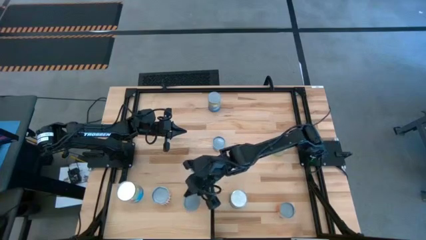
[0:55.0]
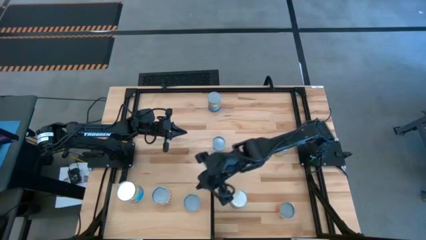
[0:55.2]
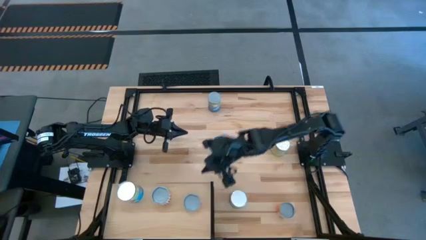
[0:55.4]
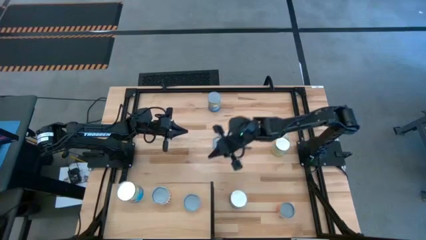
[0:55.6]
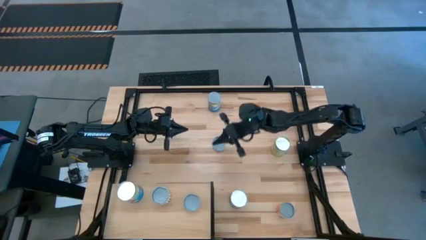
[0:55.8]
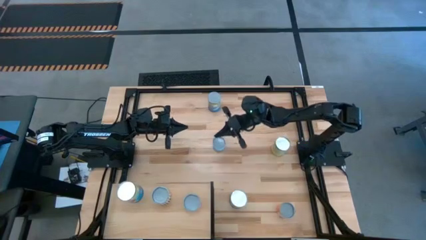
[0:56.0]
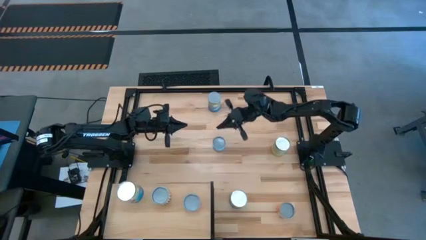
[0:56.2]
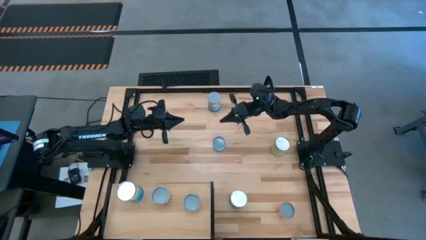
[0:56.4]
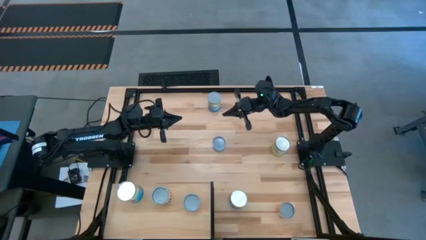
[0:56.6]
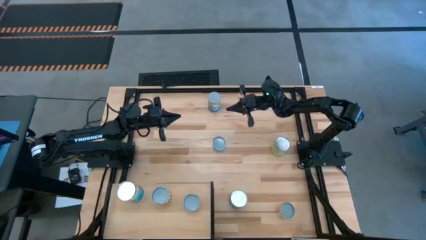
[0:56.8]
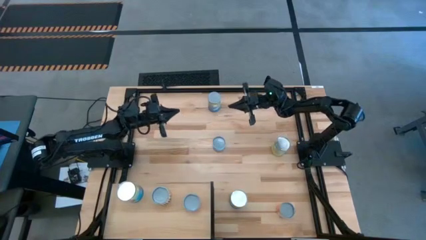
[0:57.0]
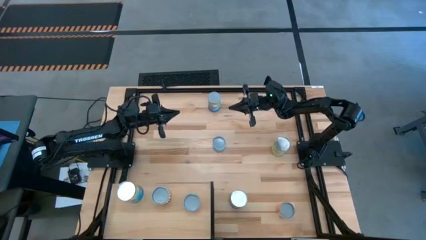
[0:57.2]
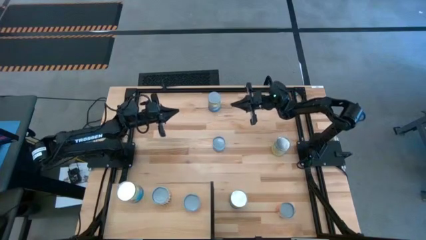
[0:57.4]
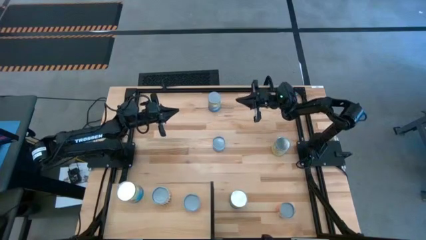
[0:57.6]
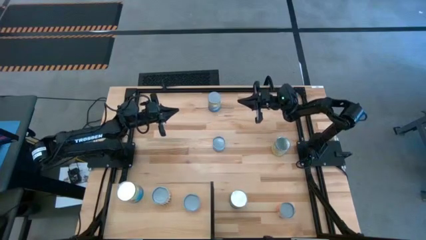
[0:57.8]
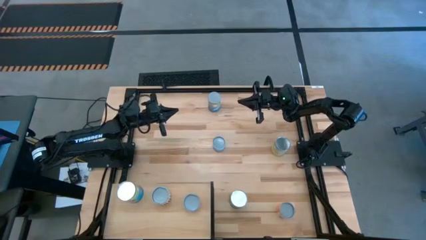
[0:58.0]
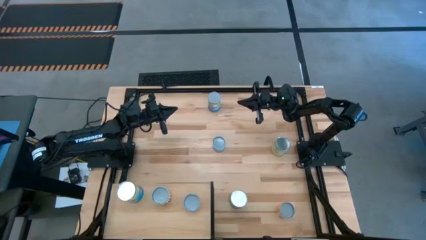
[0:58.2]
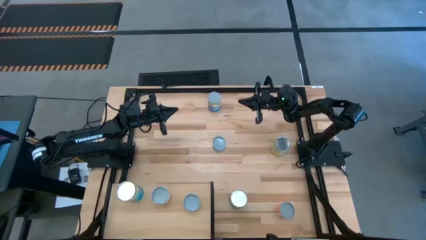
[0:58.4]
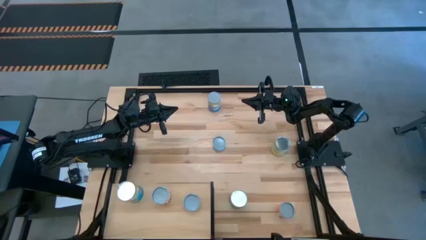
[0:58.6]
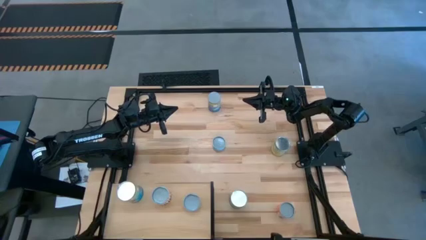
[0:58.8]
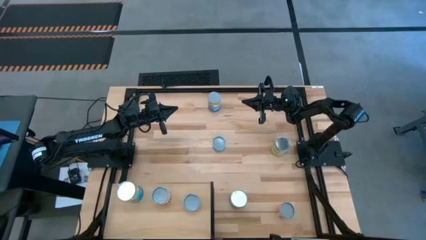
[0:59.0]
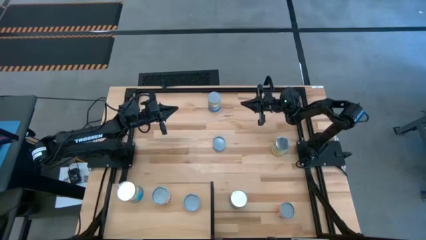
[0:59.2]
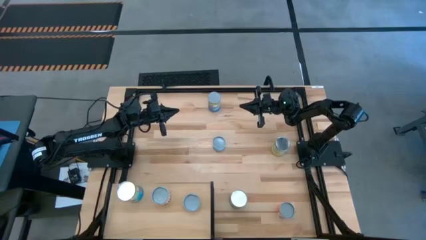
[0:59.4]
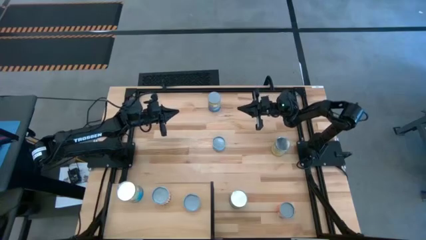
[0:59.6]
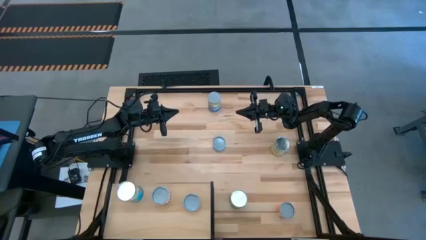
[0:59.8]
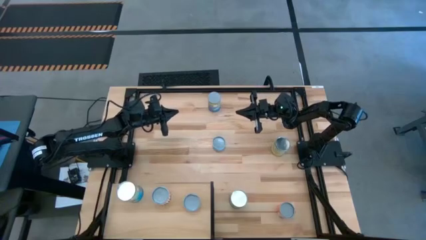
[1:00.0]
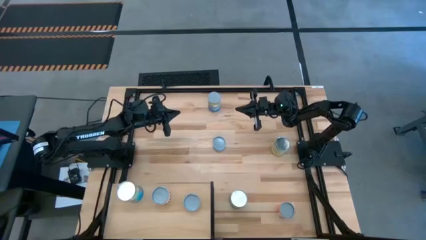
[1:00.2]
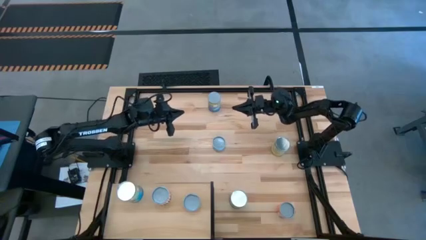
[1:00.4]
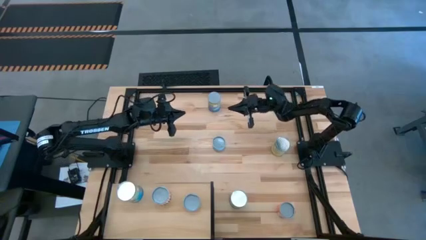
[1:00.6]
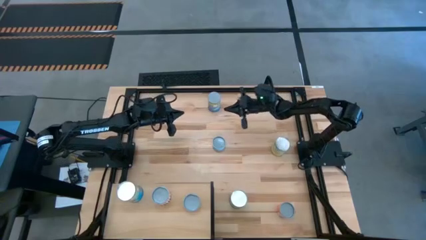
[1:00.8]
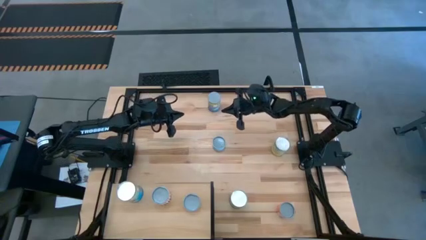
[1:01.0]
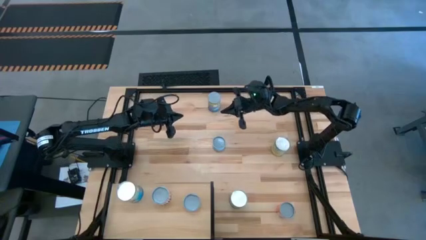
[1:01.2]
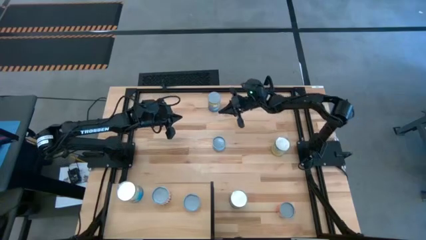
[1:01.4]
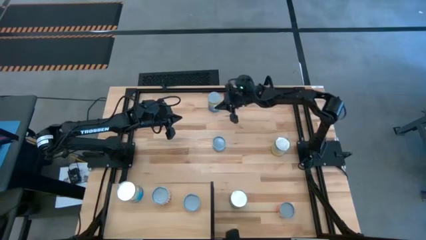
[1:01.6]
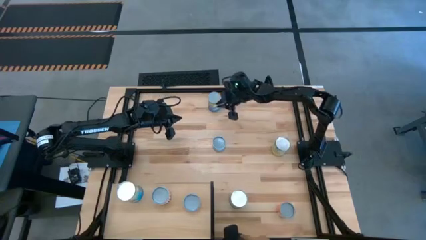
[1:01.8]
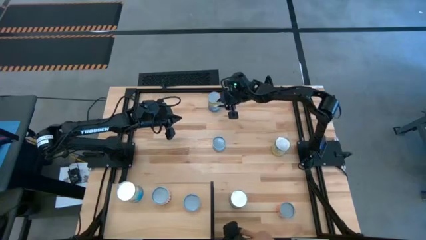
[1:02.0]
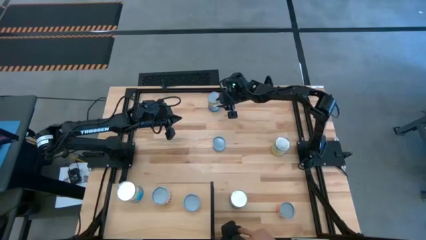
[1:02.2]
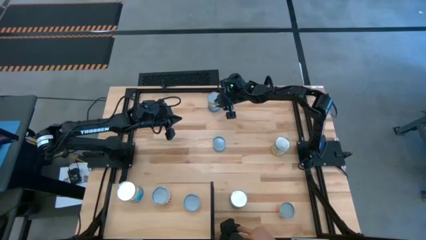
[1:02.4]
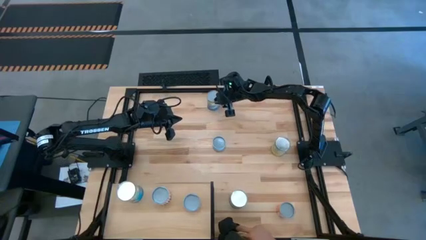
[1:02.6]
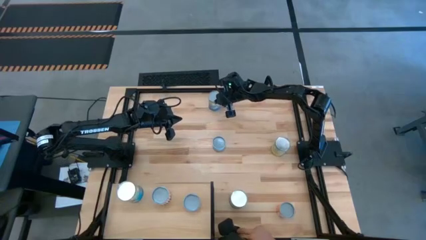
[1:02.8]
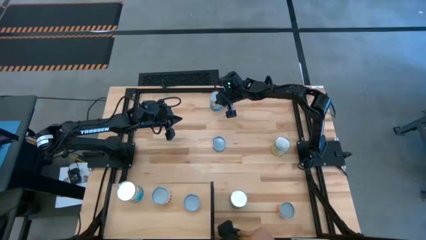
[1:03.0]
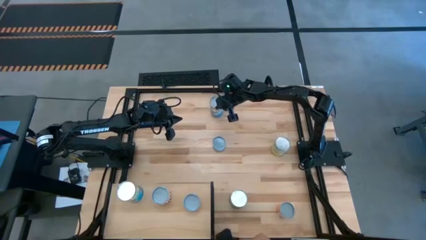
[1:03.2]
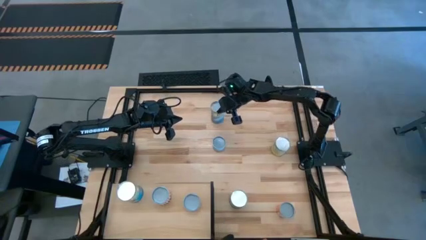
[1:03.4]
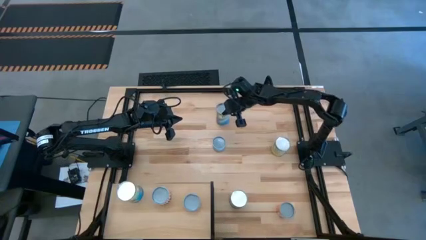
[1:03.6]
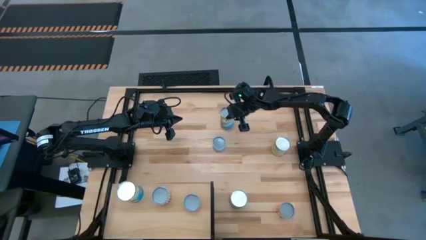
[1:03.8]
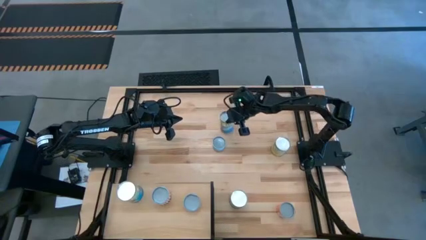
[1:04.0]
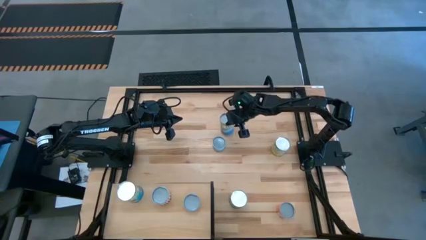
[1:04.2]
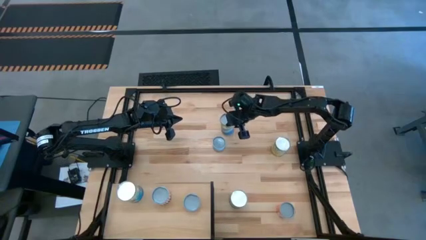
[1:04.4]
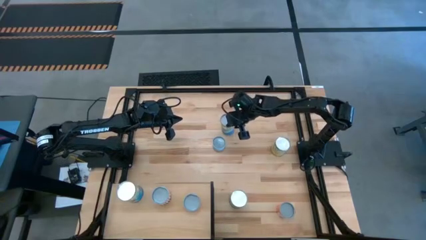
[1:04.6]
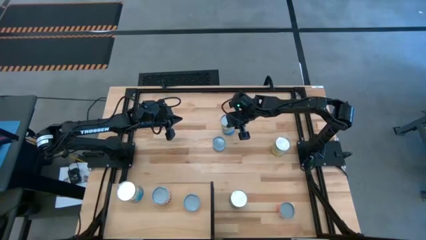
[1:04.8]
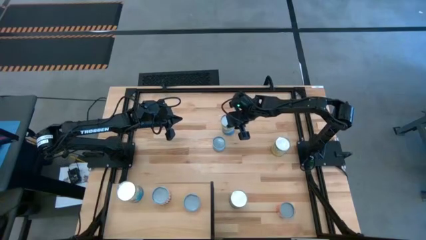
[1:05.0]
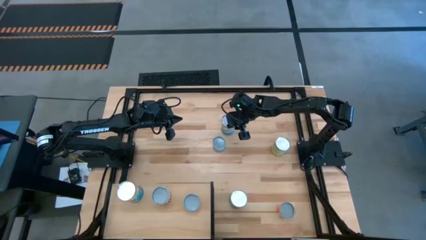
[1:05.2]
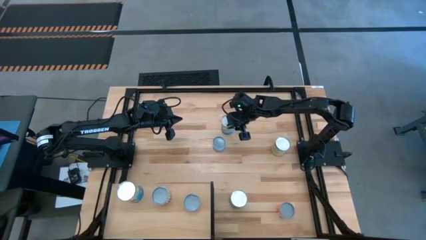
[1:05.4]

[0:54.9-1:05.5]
Task: Pick and place cans onto a shelf
Move the canned peas to the middle of the table
